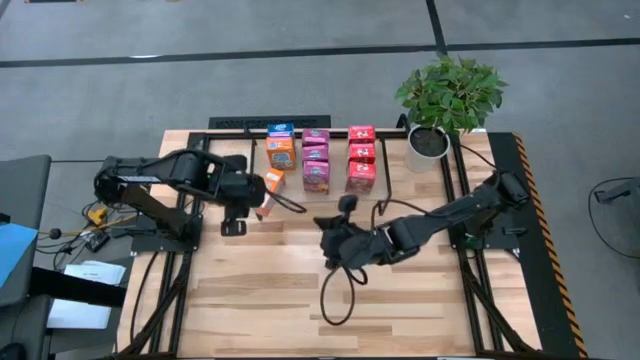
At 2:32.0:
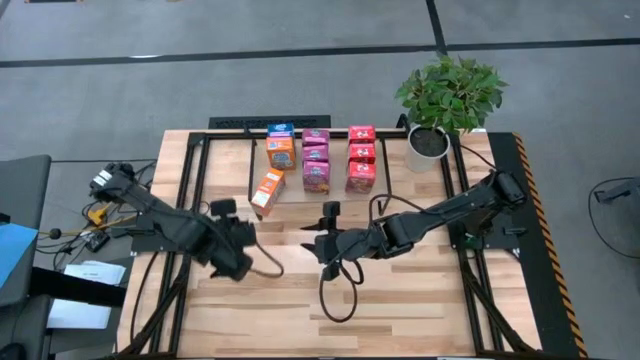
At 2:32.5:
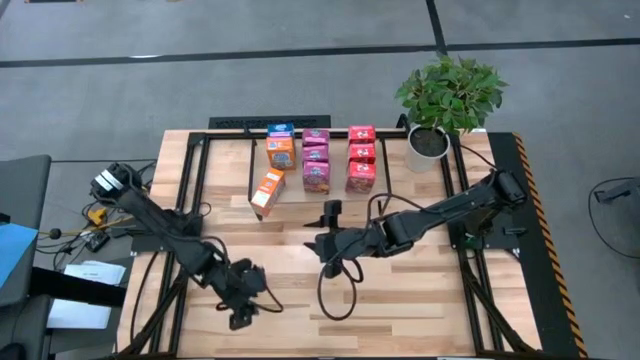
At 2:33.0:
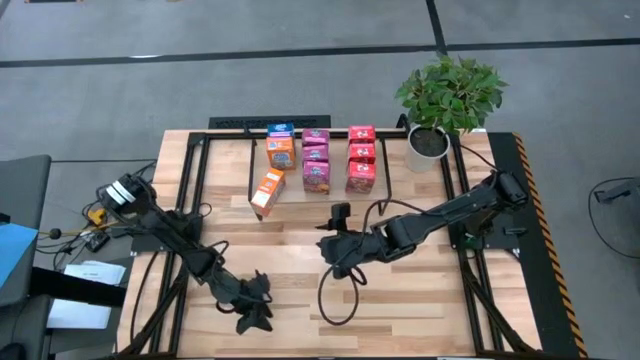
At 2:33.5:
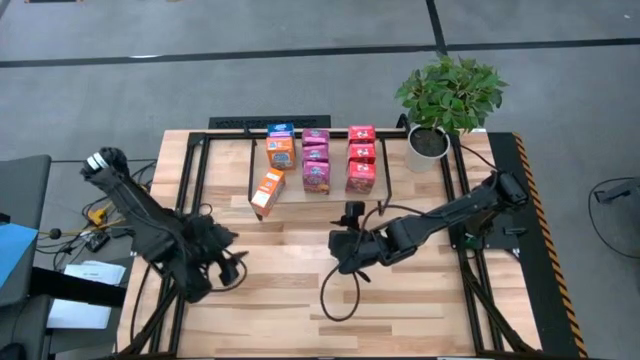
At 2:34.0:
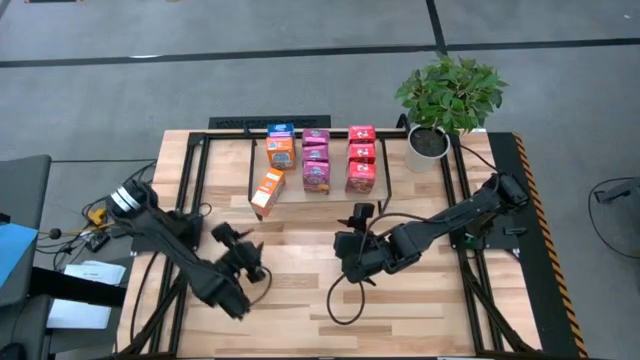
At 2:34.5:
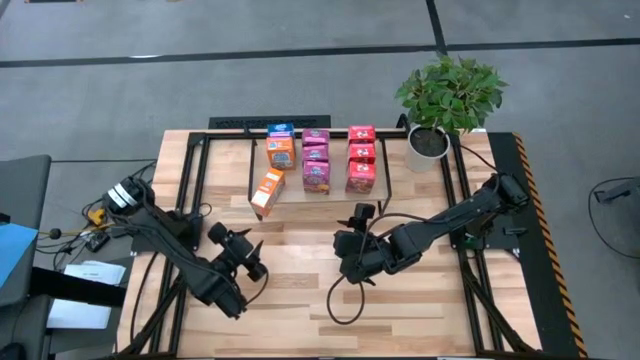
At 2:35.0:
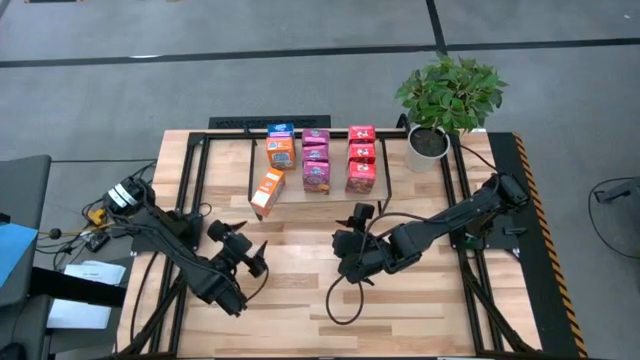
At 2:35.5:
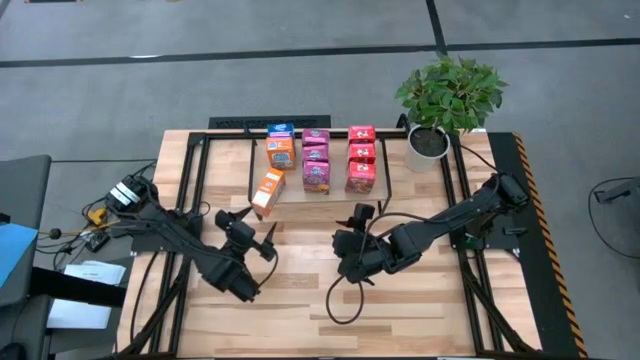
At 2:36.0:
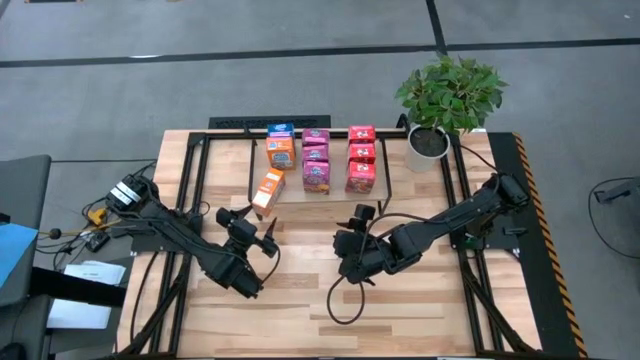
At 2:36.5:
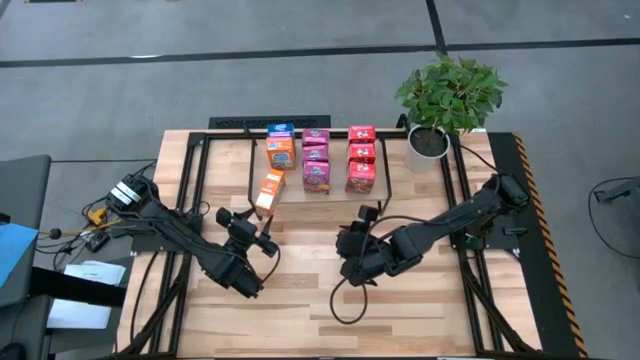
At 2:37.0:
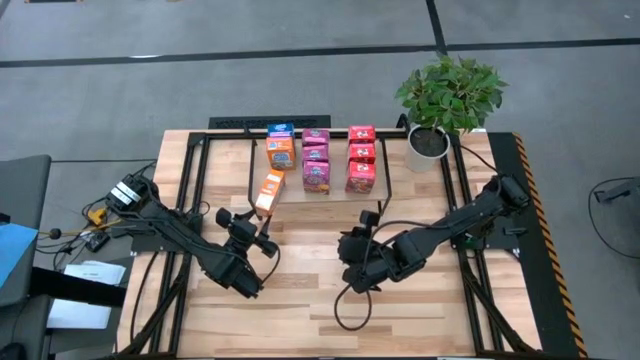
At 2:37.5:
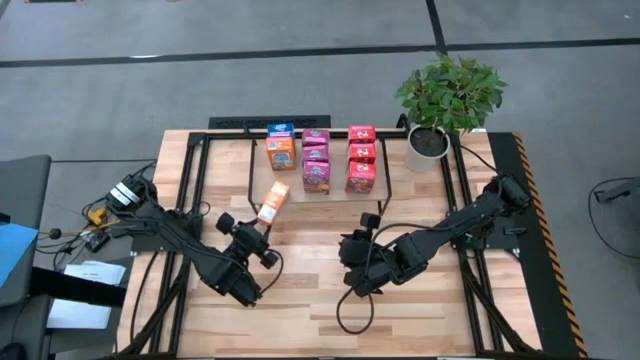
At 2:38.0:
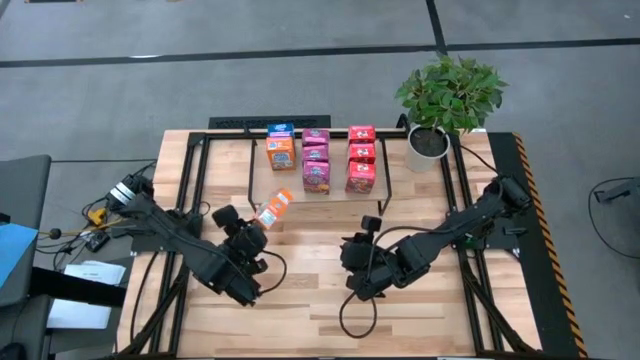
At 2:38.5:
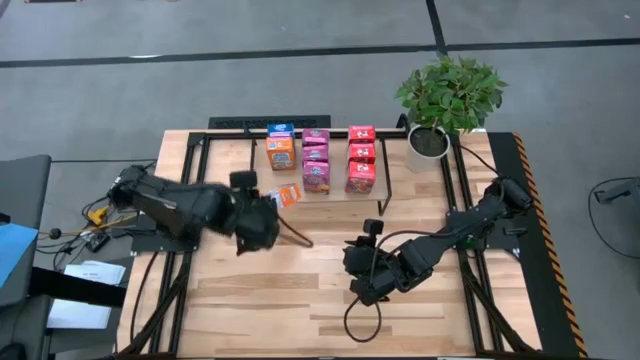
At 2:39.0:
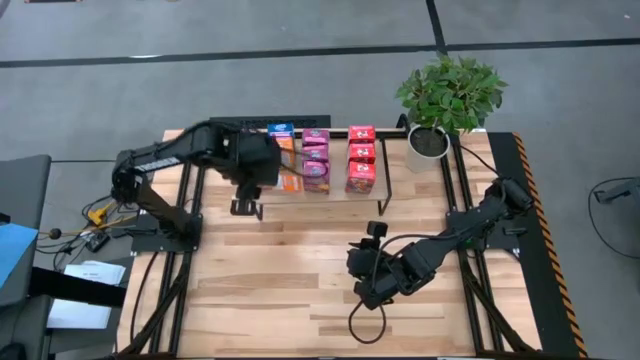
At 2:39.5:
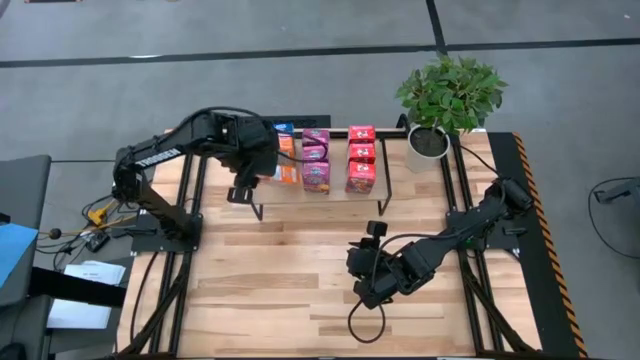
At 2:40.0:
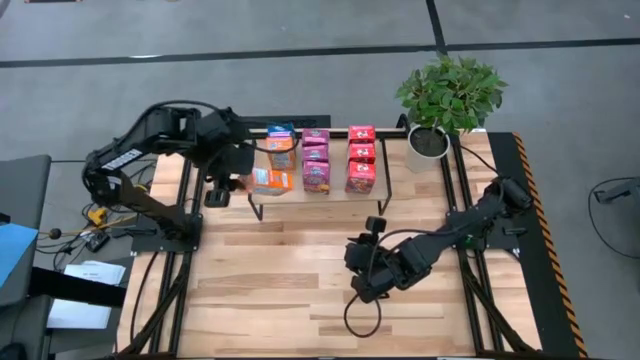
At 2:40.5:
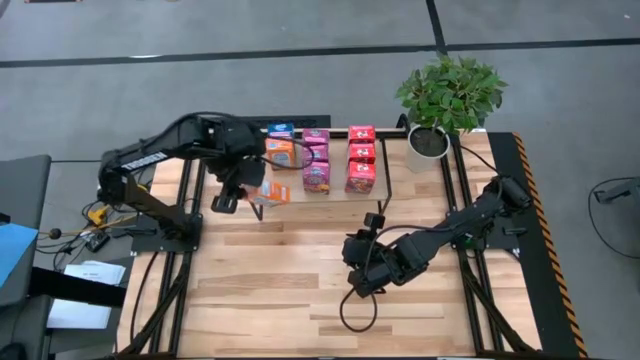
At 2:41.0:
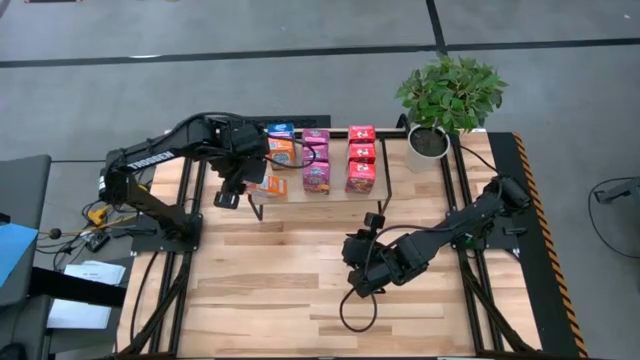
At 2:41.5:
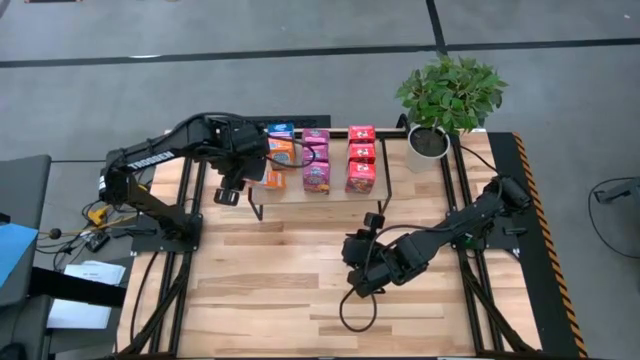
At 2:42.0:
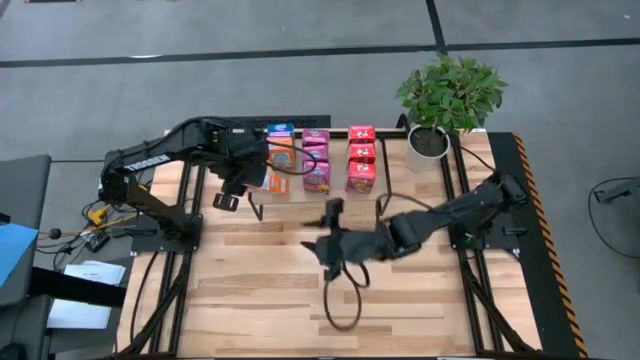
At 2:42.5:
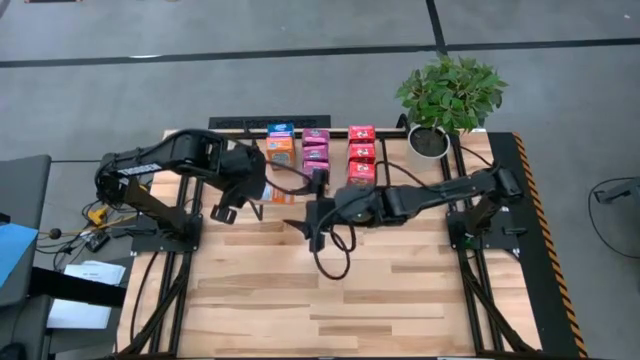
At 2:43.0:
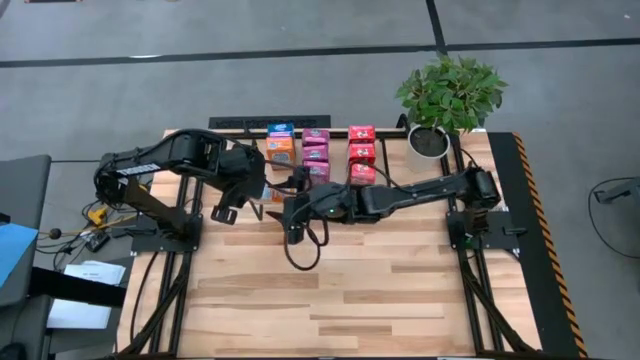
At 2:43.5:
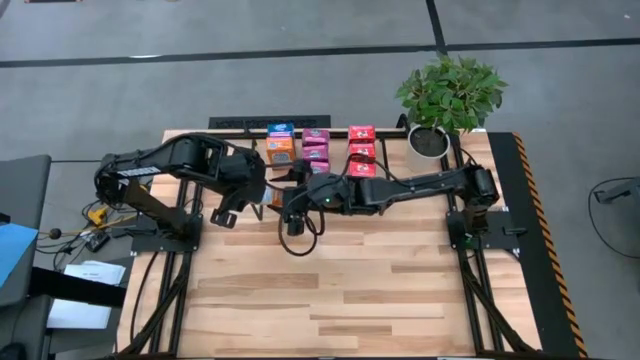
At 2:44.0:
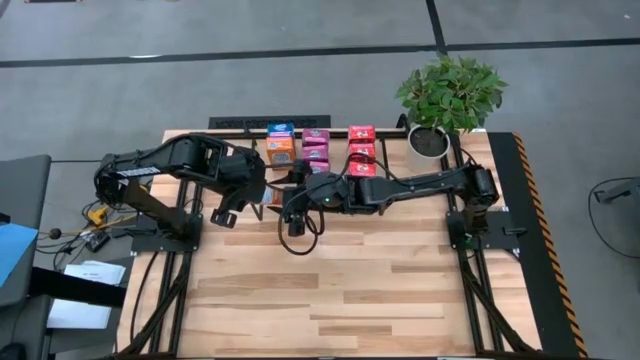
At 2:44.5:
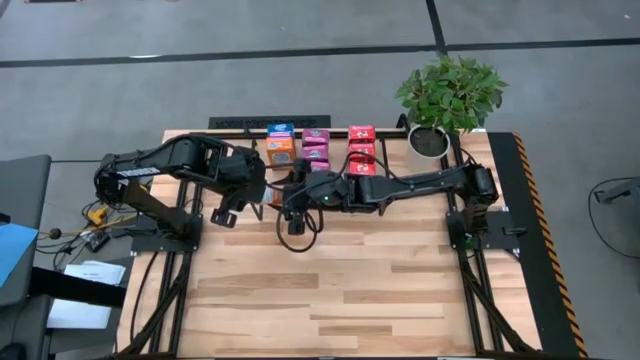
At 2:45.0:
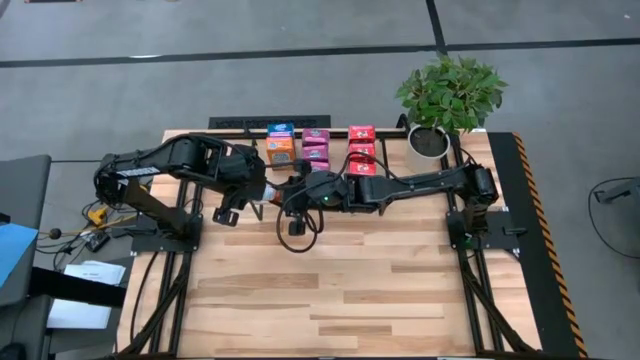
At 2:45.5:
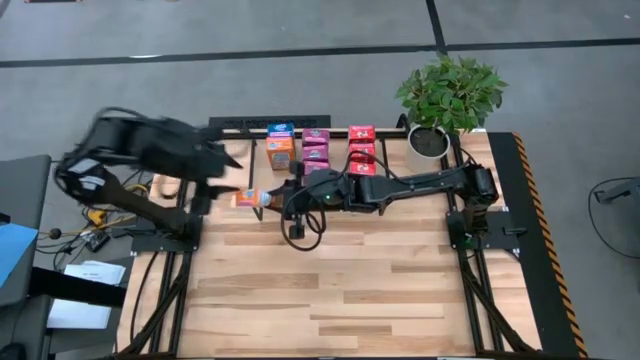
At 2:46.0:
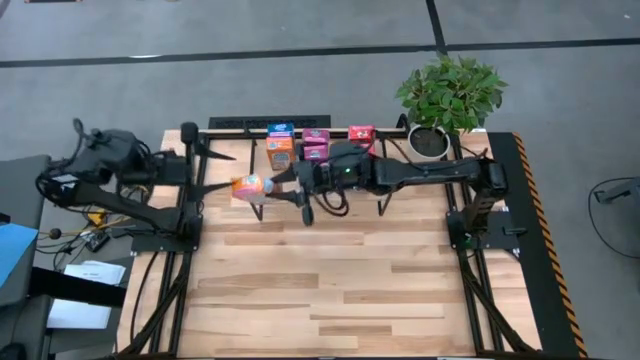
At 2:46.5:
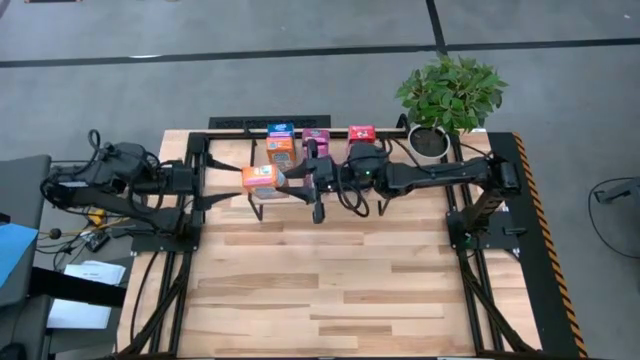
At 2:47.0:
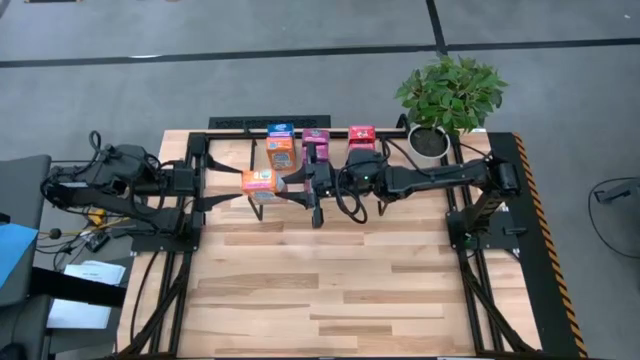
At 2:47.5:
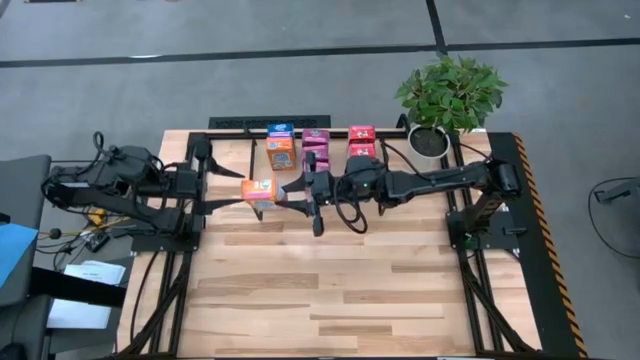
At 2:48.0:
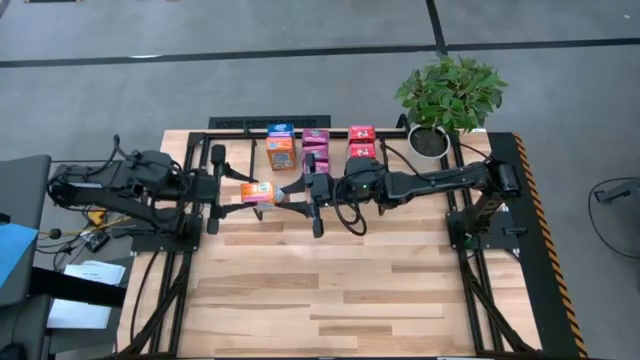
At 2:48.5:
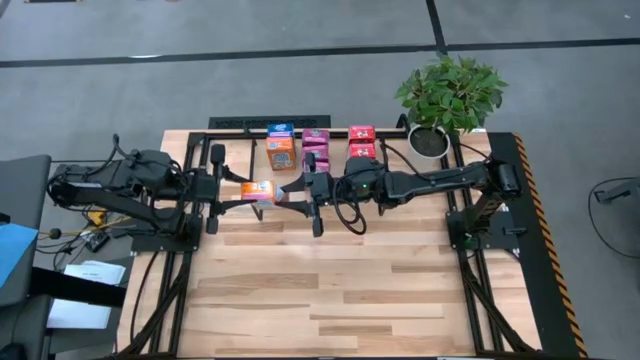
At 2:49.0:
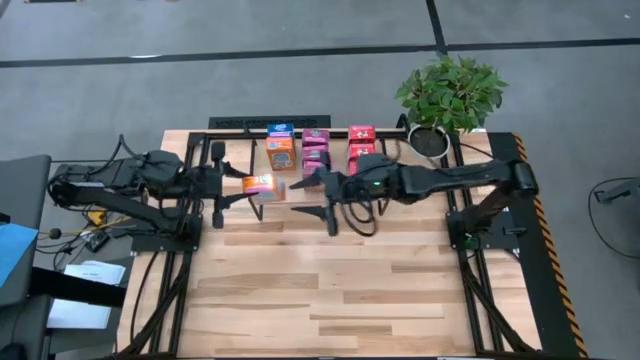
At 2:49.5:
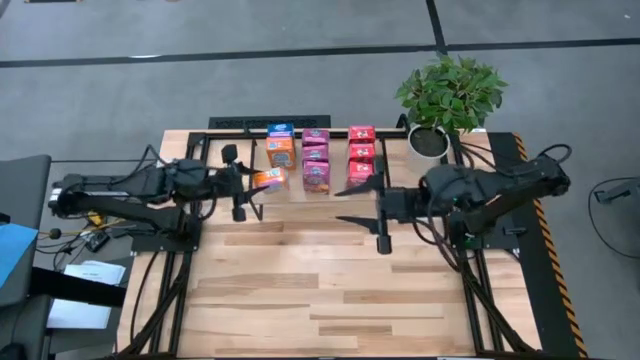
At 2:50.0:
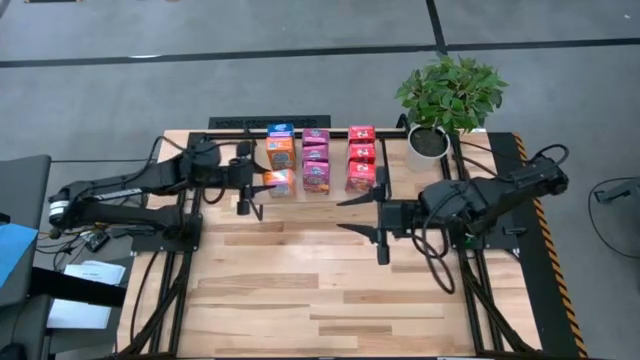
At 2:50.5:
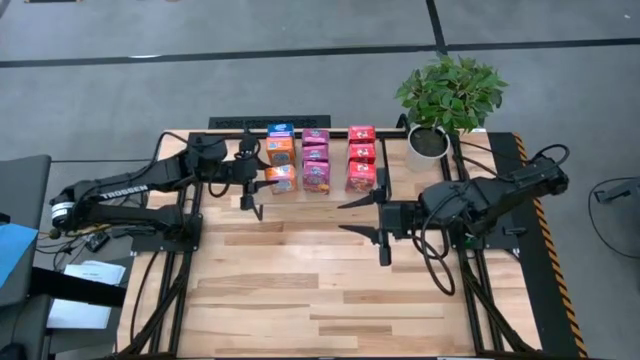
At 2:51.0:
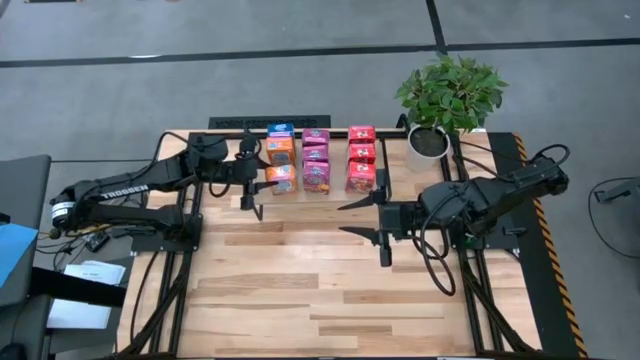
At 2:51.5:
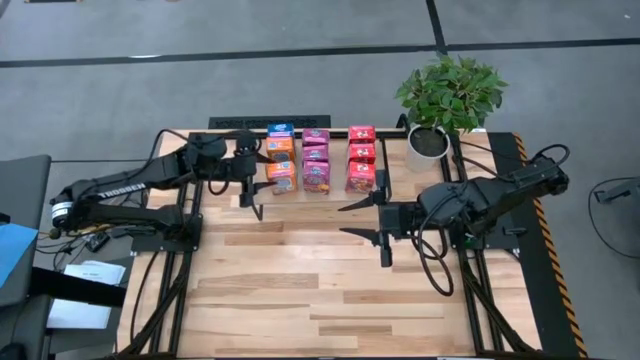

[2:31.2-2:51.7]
Task: Stack cereal on shelf
Put the orange cereal box on the shelf aligned with the other orange cereal box

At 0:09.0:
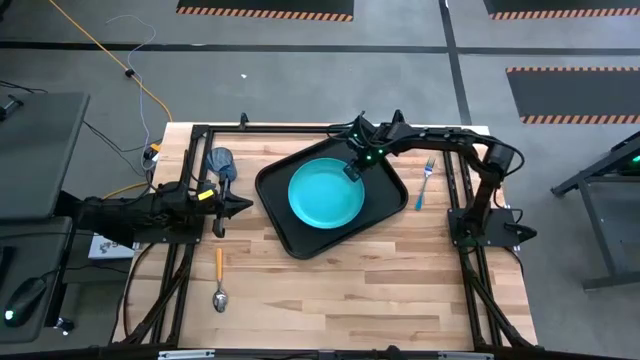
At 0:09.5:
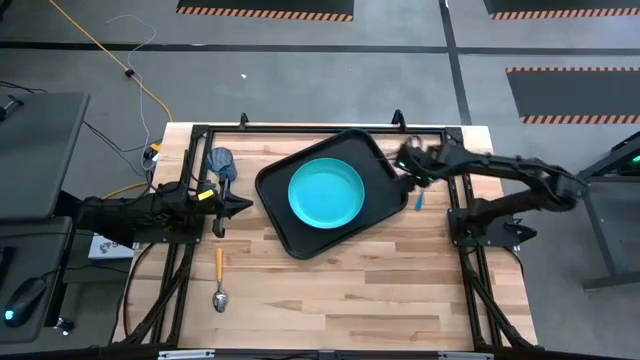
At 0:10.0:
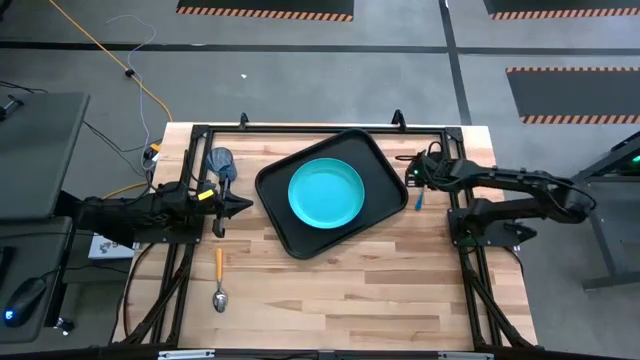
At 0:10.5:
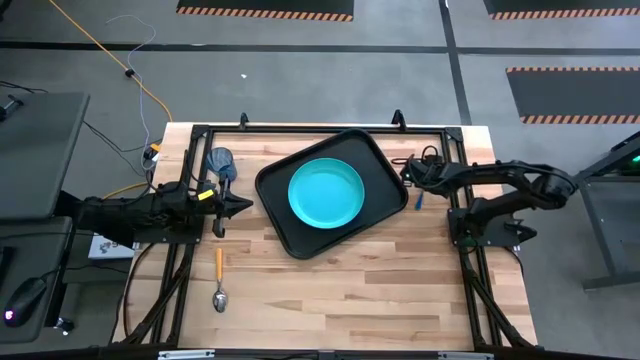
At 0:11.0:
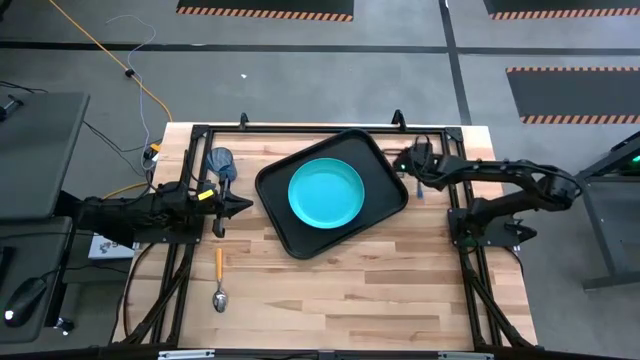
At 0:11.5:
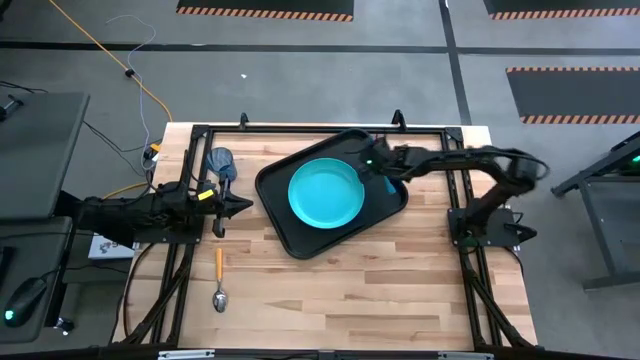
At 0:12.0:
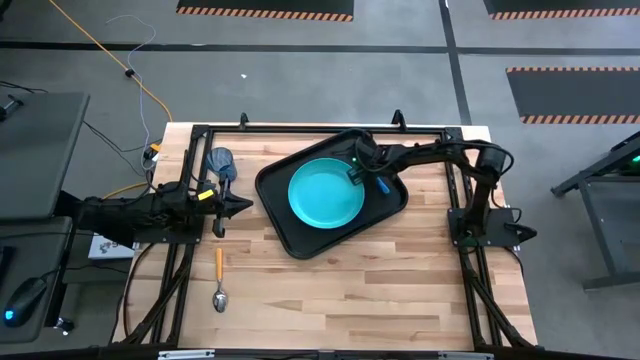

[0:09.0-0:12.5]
Task: Pick and place plate/cup/fork/spoon on tray
Put the blue fork on the right side of the light blue plate
